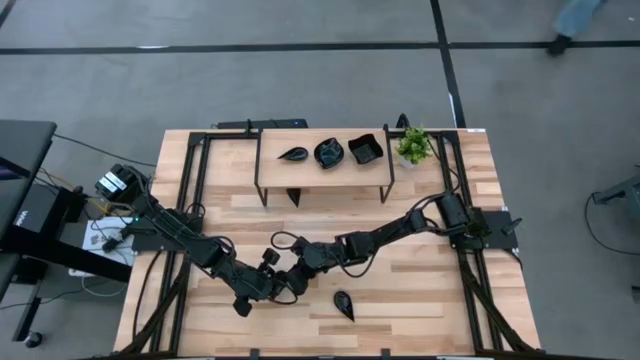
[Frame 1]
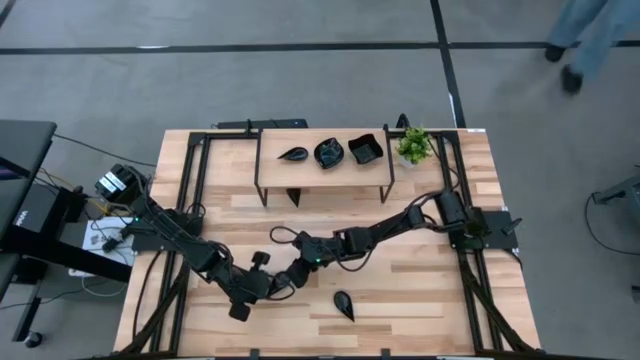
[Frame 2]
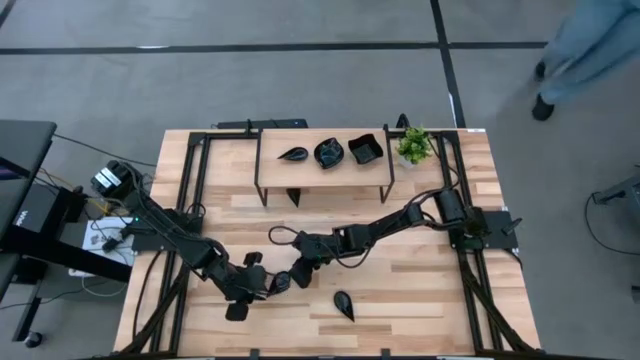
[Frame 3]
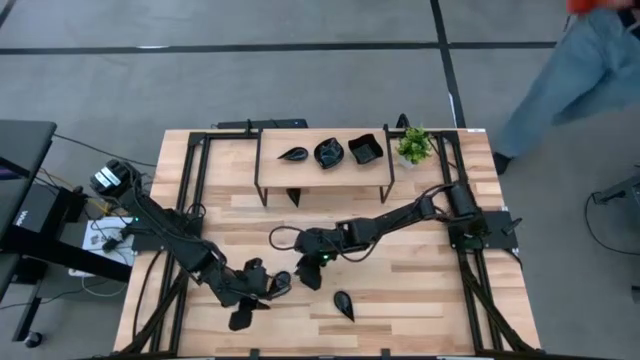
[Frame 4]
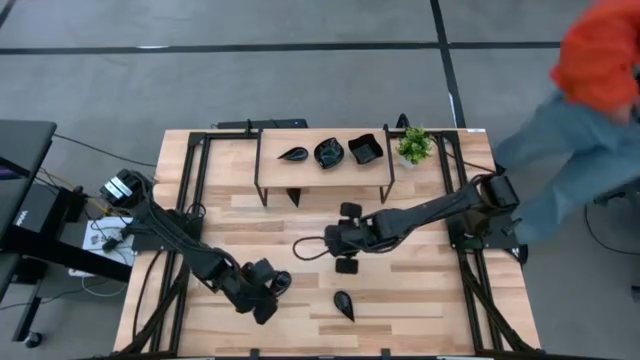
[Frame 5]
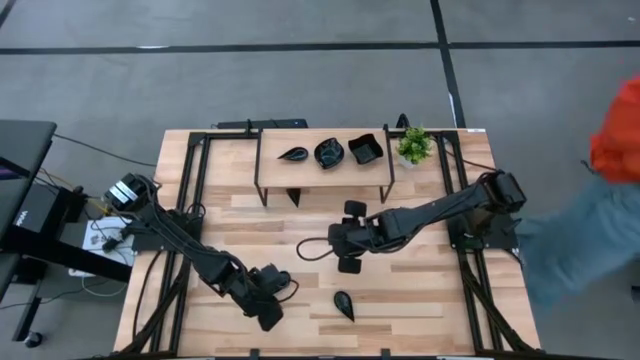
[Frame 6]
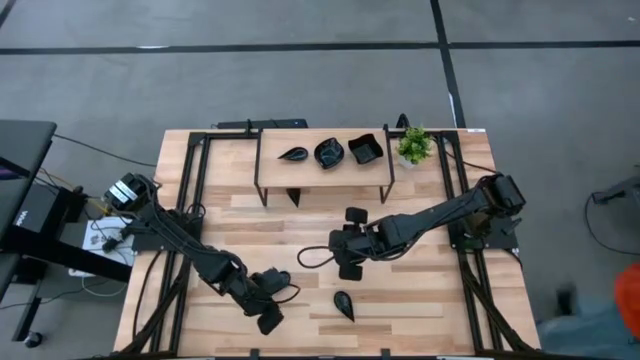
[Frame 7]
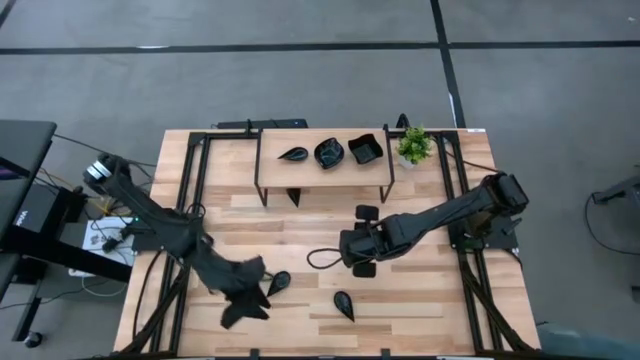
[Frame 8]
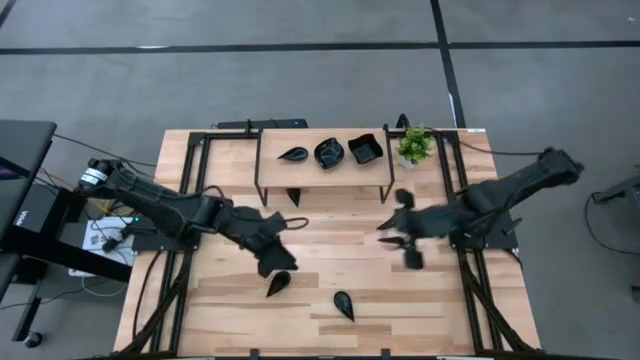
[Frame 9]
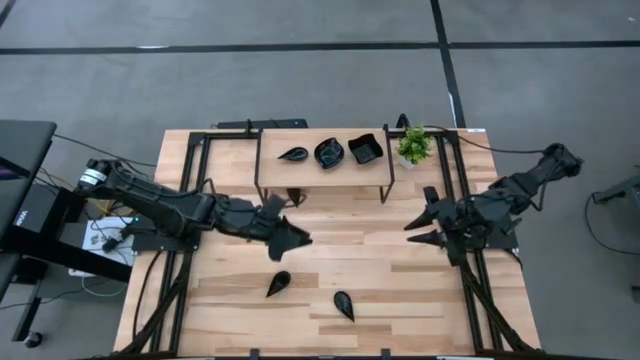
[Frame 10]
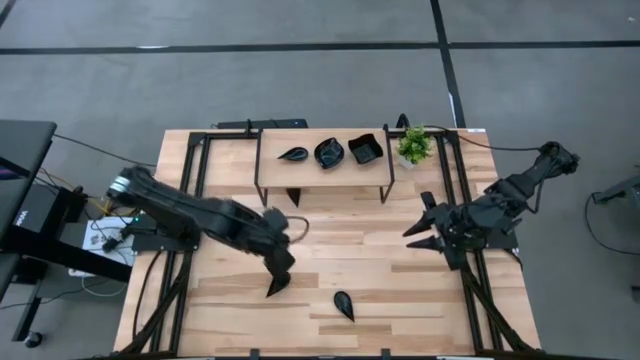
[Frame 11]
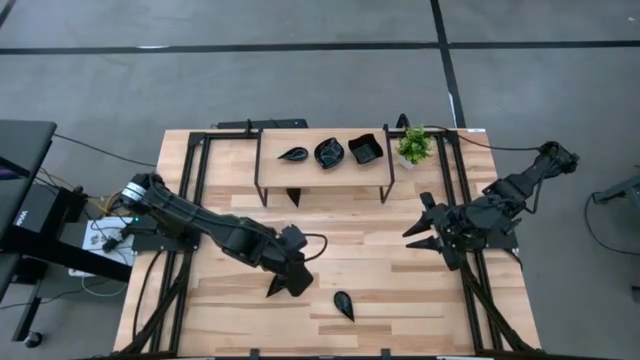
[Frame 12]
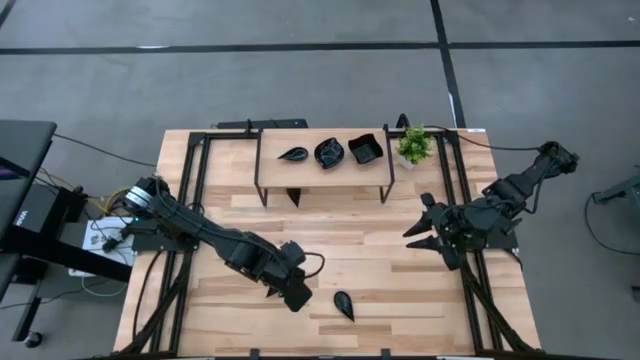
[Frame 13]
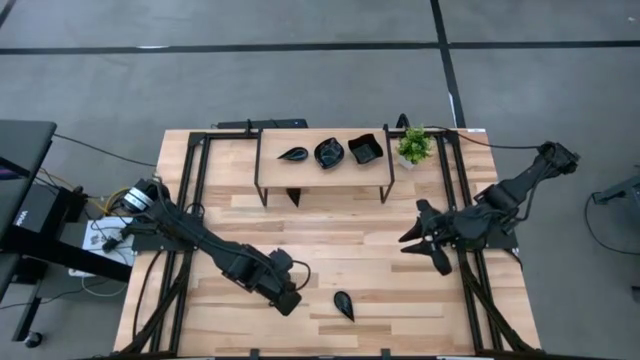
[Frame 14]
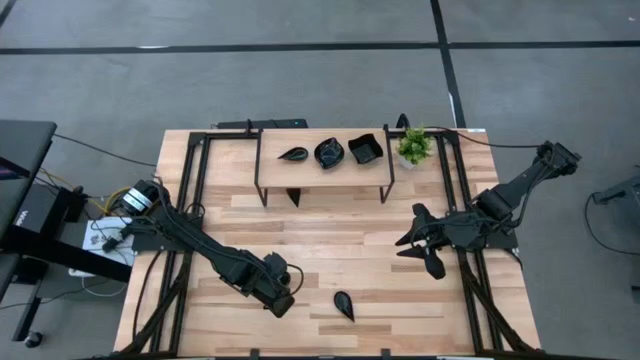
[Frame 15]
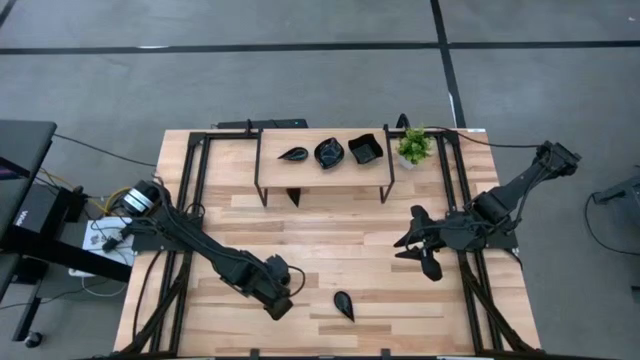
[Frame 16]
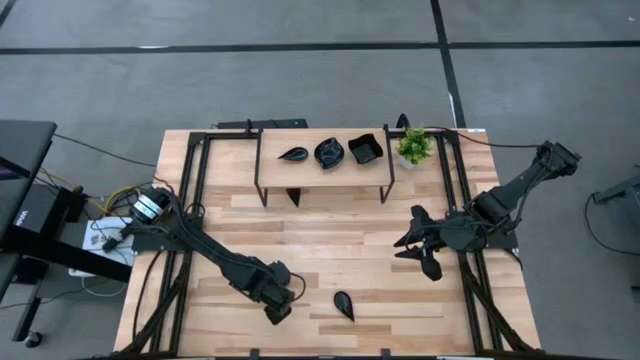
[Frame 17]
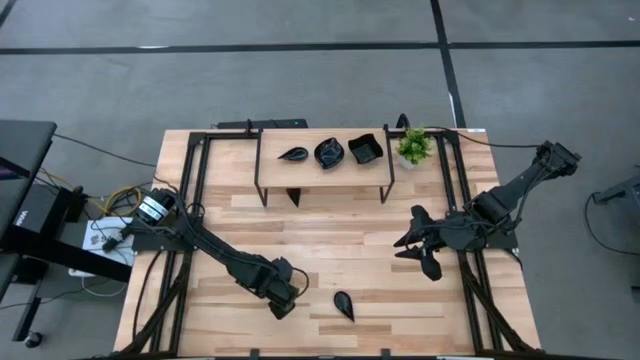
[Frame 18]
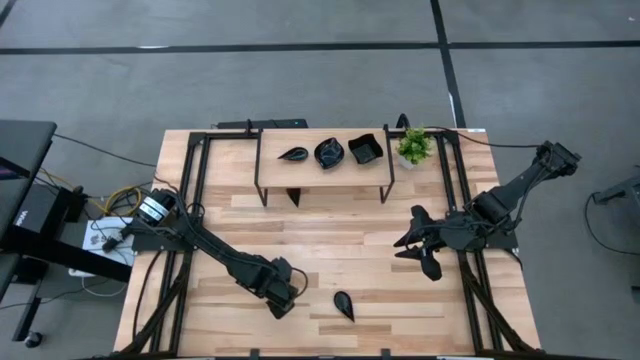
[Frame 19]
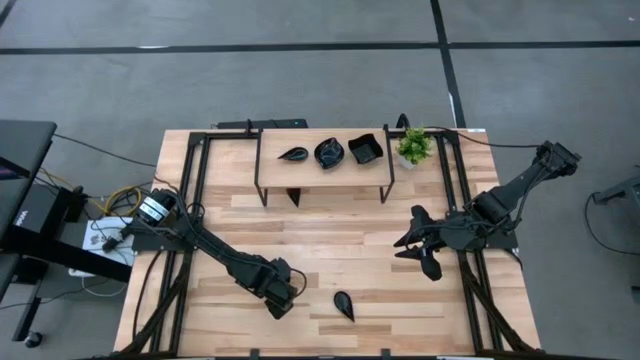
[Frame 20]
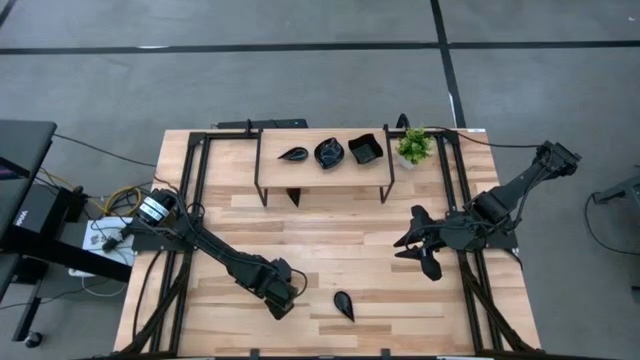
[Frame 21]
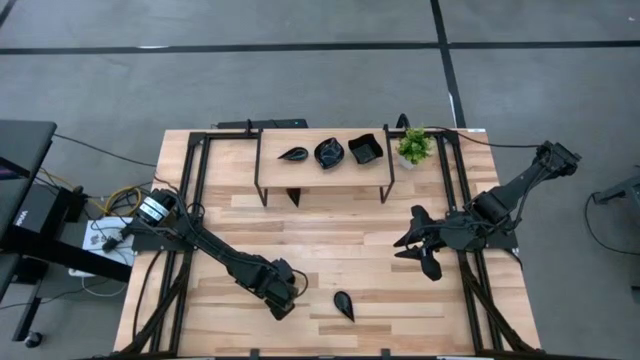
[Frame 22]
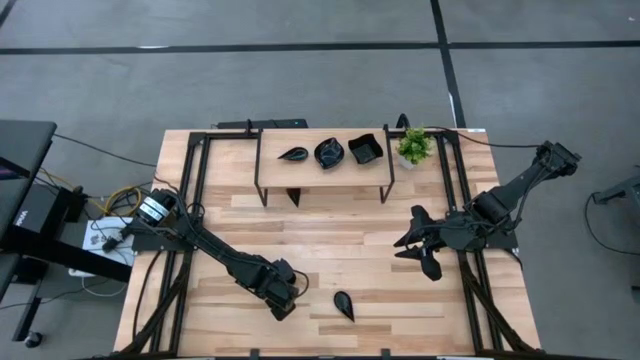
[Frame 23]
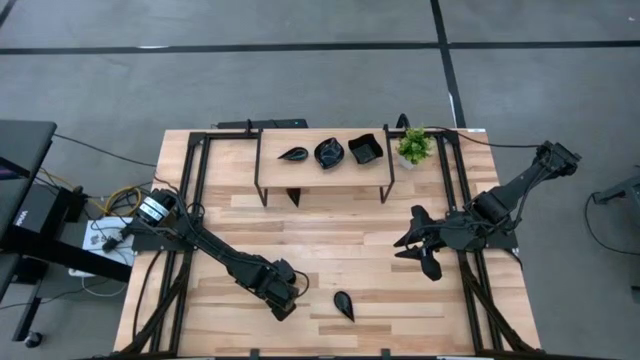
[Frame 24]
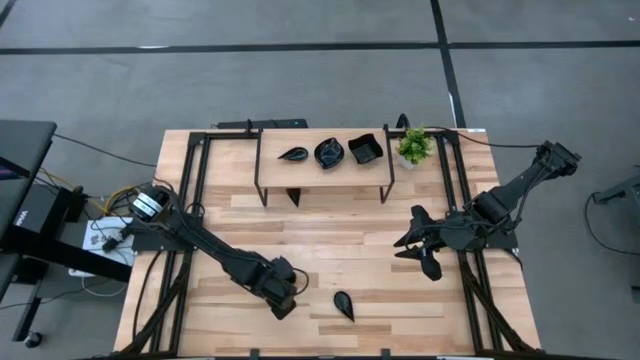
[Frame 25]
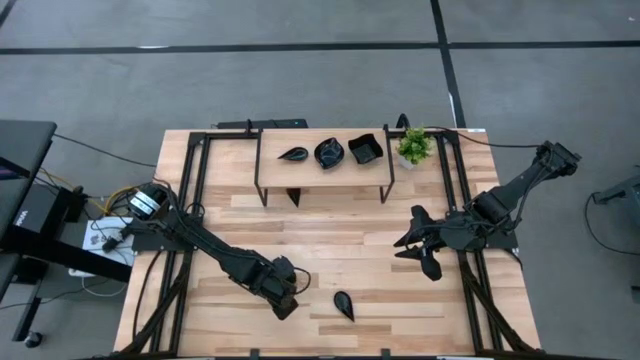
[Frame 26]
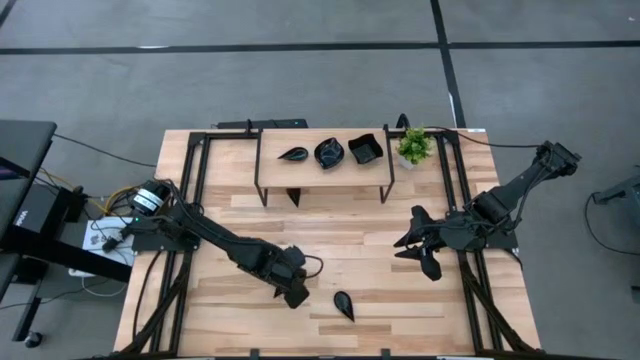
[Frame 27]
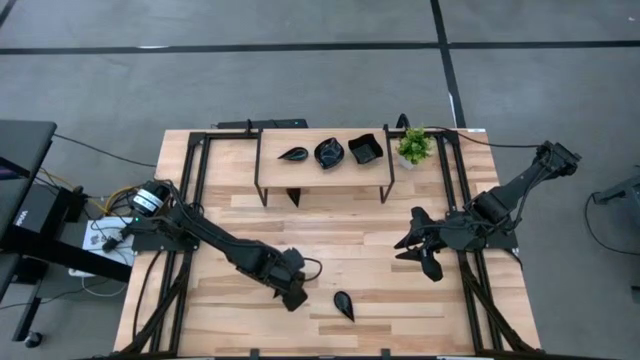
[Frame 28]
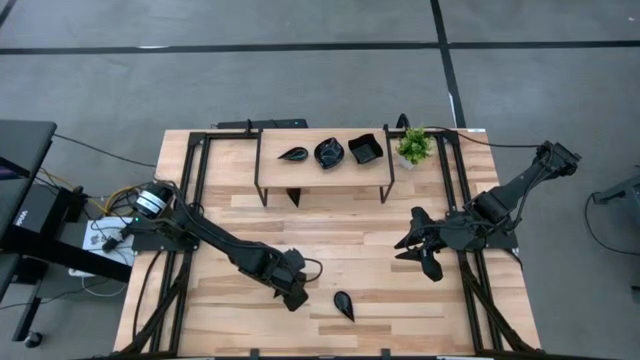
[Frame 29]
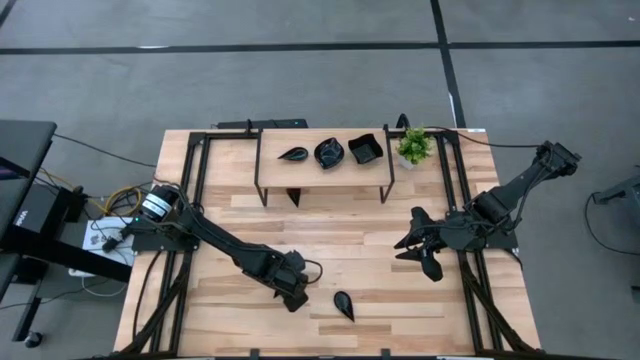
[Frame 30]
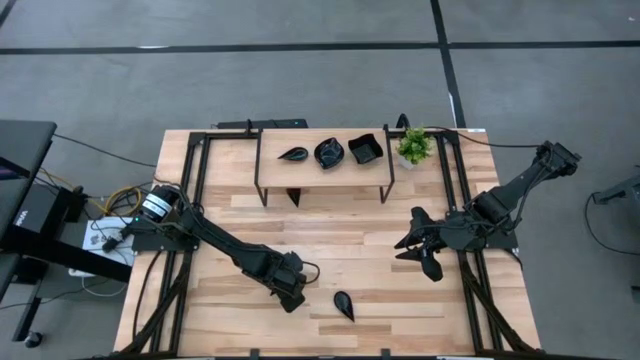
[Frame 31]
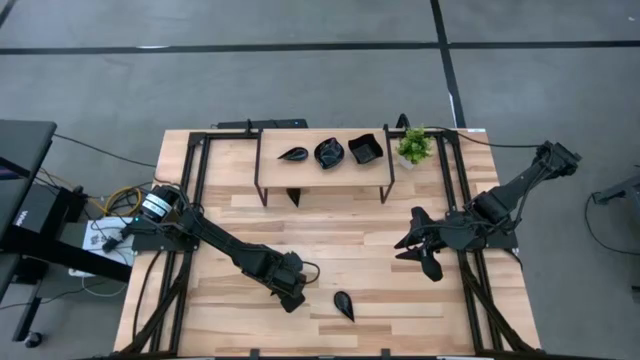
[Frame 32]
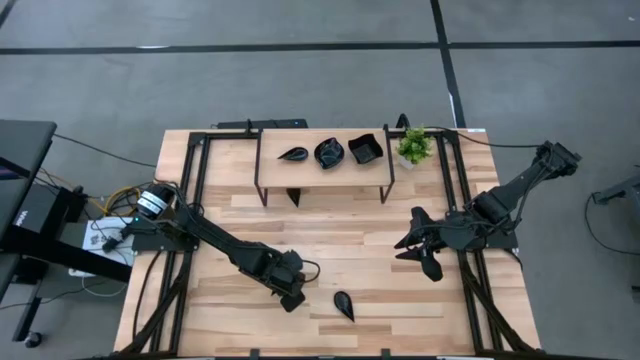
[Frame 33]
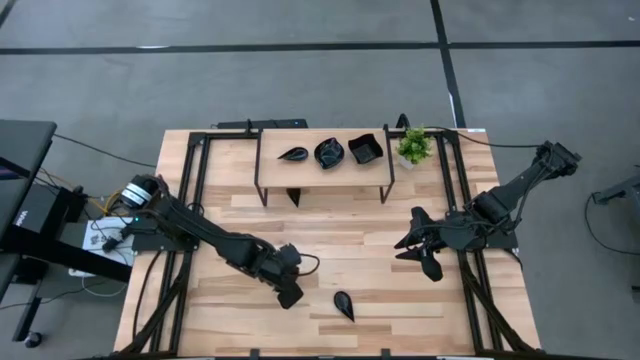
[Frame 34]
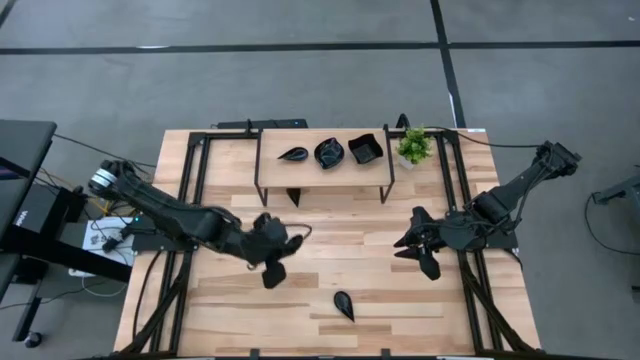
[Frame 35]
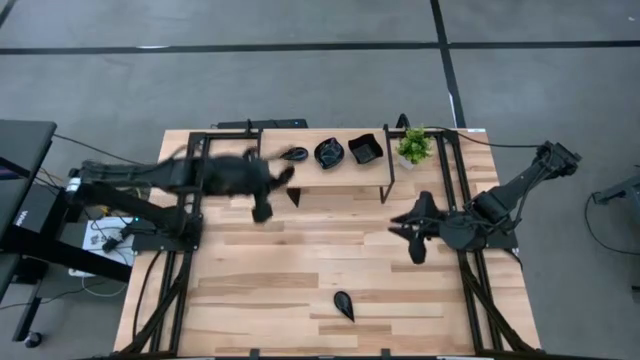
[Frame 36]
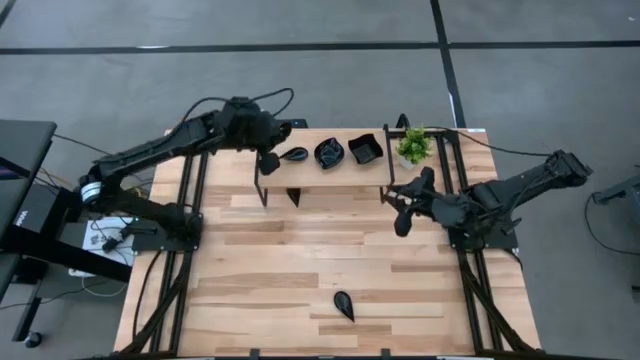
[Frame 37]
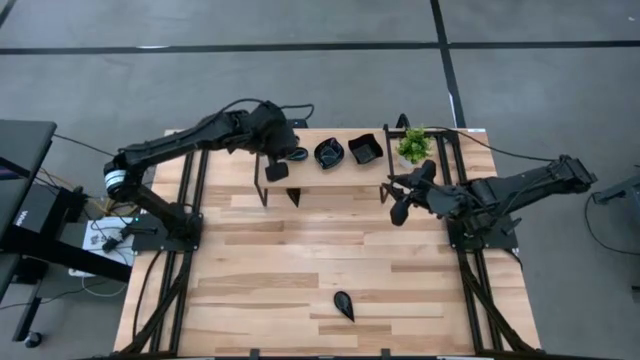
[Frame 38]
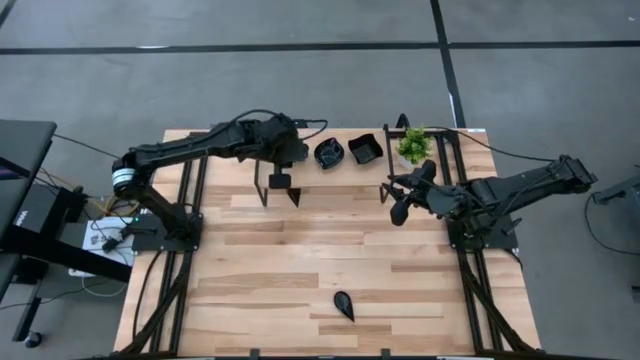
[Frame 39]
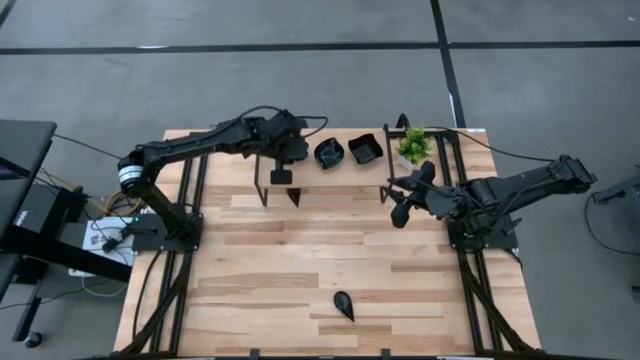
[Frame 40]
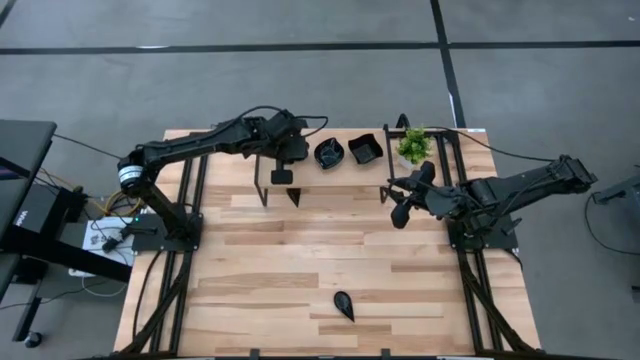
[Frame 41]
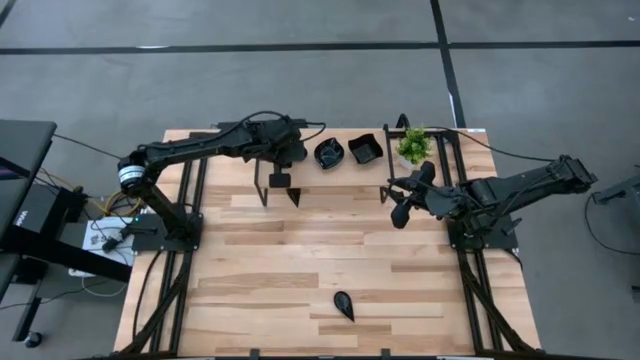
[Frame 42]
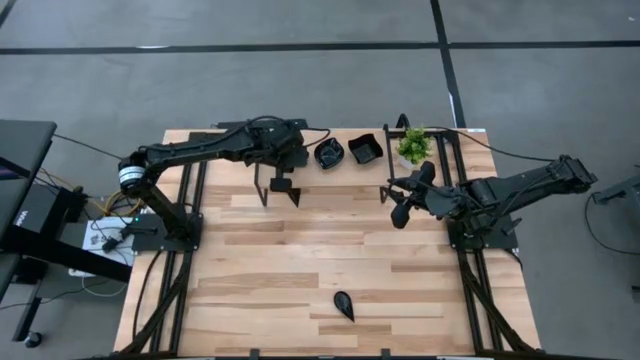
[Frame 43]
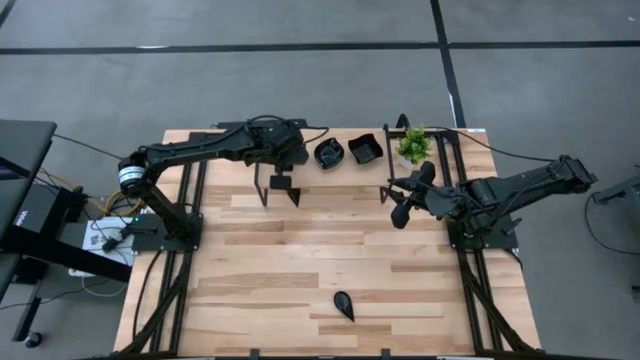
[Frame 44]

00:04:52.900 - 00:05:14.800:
Task: Pick & Place Mini shaped plates
Stack the black drop shaped plate on the black drop shaped plate on the shelf
